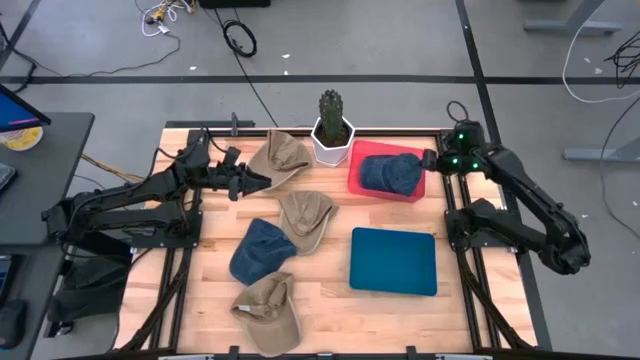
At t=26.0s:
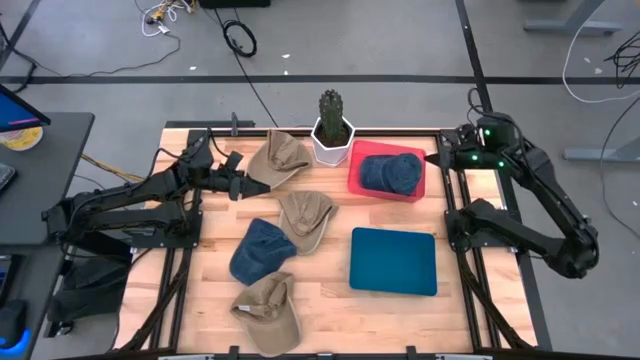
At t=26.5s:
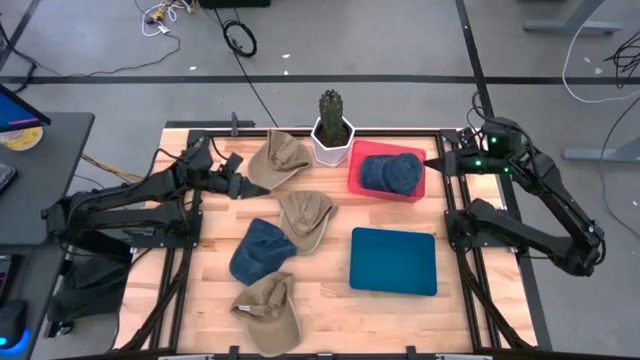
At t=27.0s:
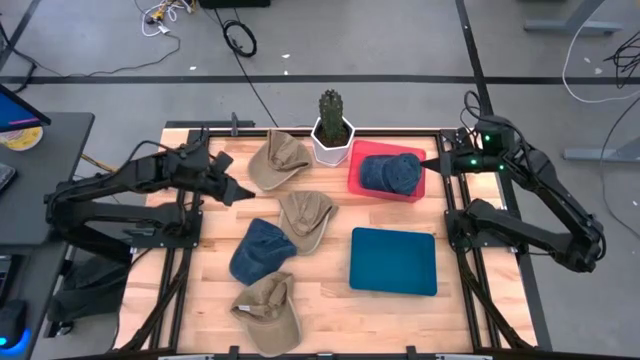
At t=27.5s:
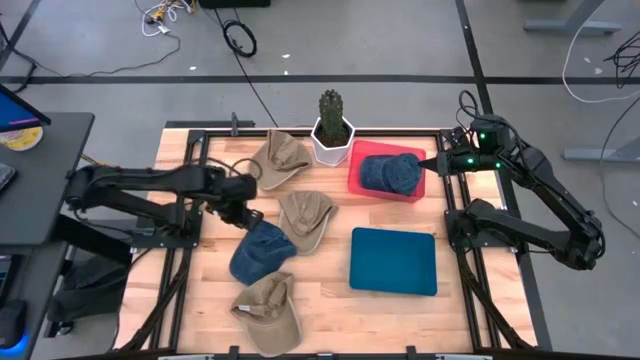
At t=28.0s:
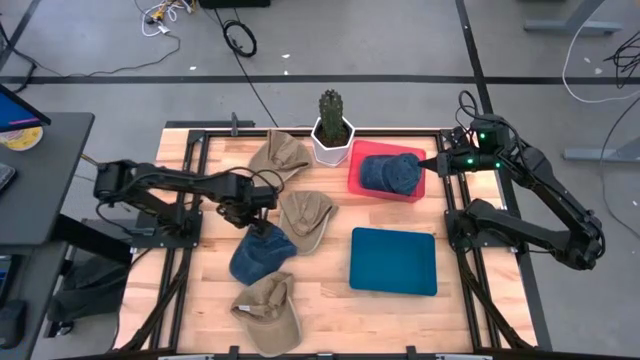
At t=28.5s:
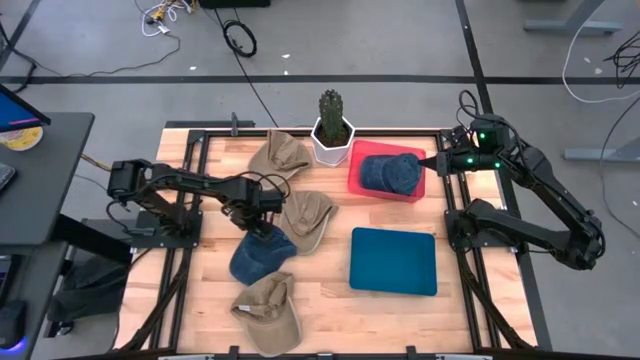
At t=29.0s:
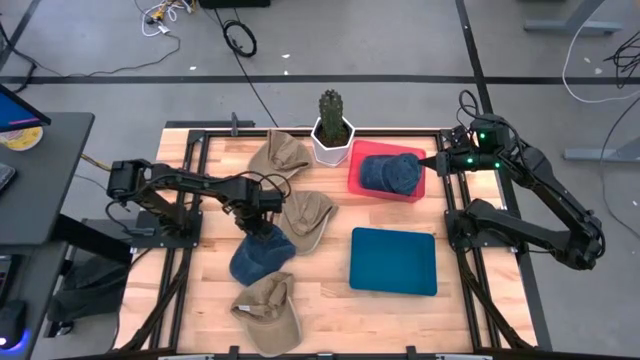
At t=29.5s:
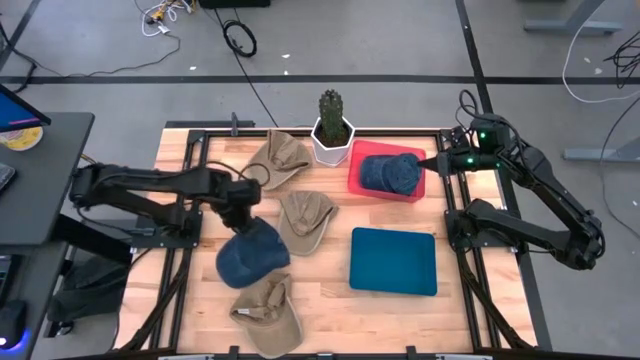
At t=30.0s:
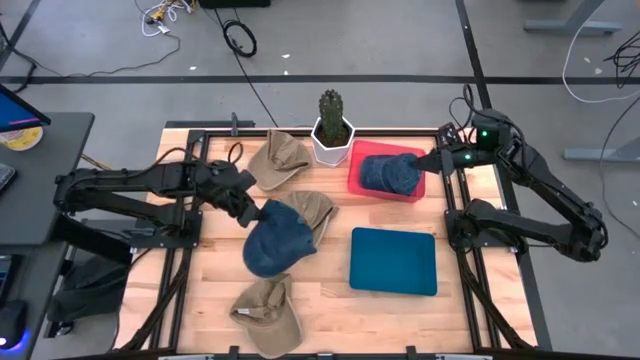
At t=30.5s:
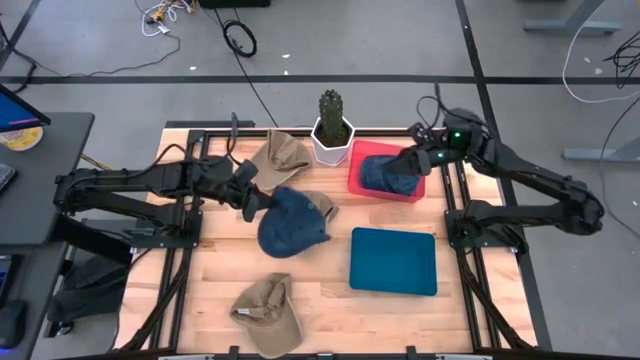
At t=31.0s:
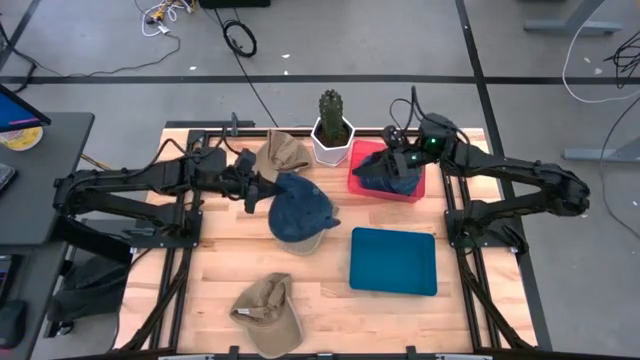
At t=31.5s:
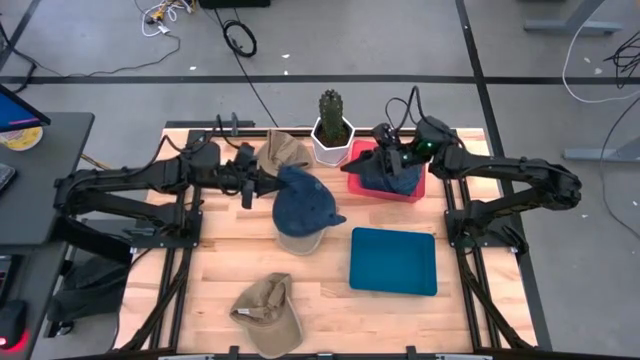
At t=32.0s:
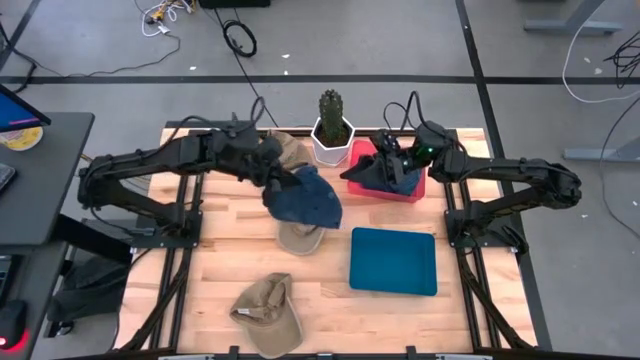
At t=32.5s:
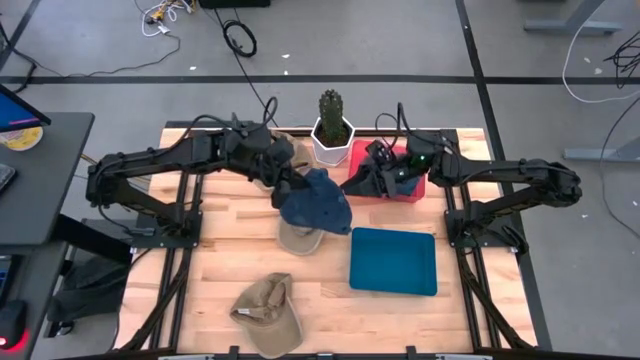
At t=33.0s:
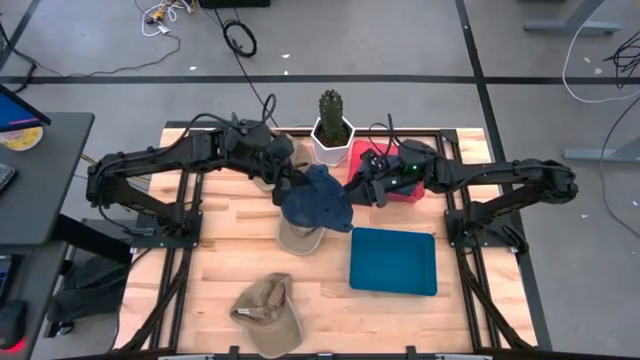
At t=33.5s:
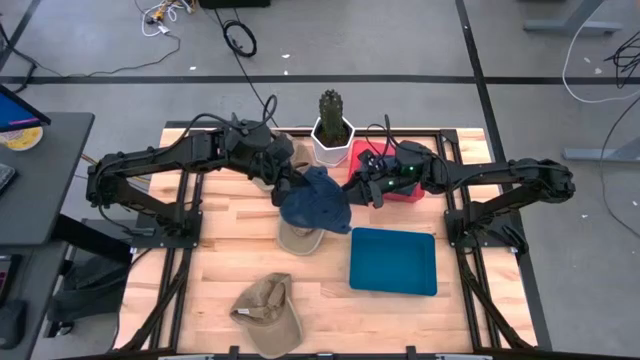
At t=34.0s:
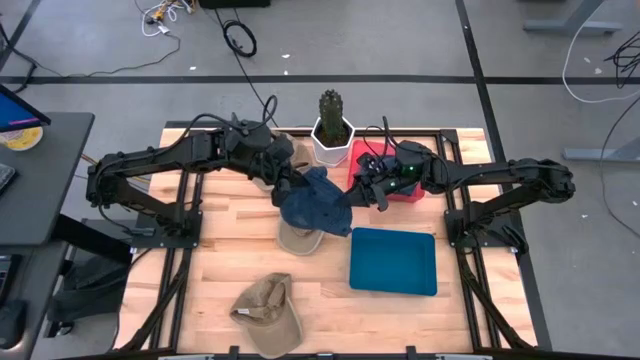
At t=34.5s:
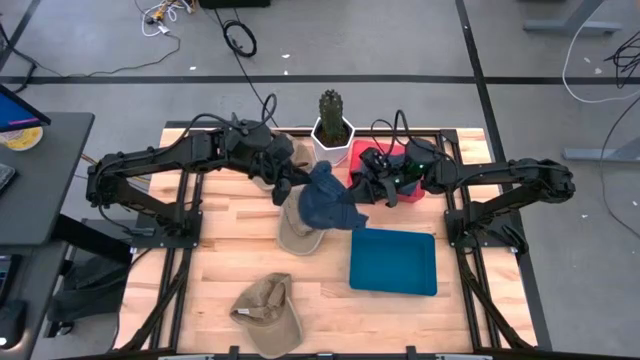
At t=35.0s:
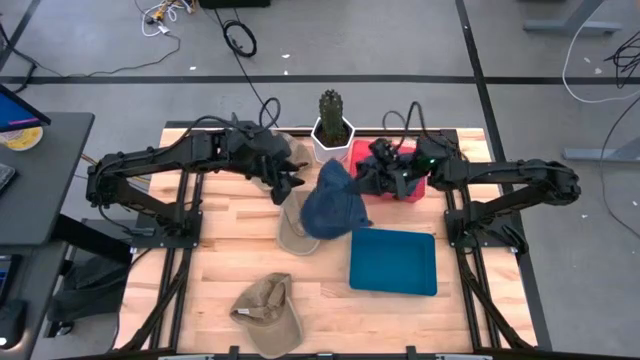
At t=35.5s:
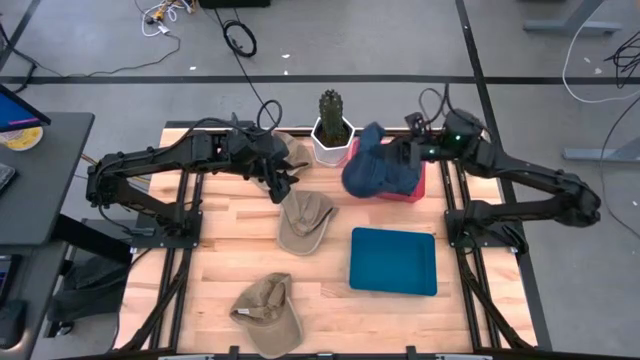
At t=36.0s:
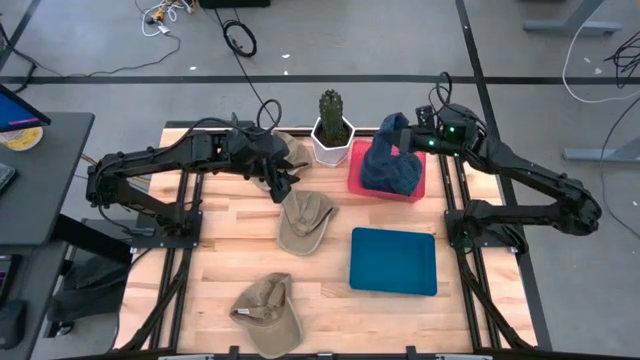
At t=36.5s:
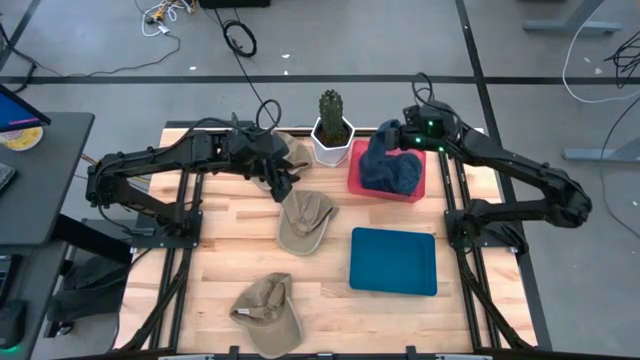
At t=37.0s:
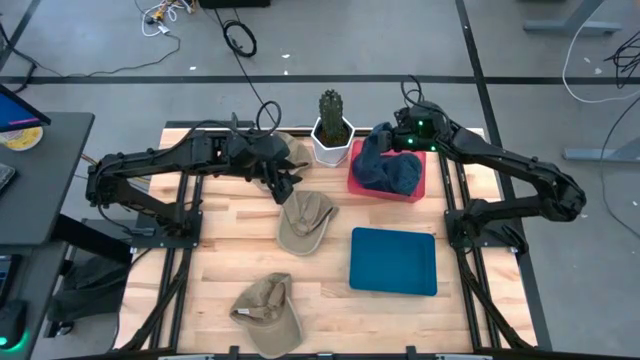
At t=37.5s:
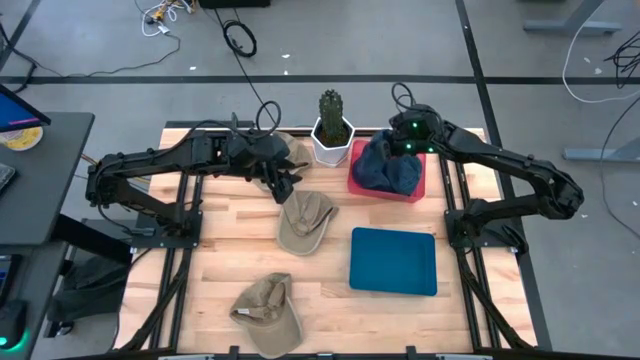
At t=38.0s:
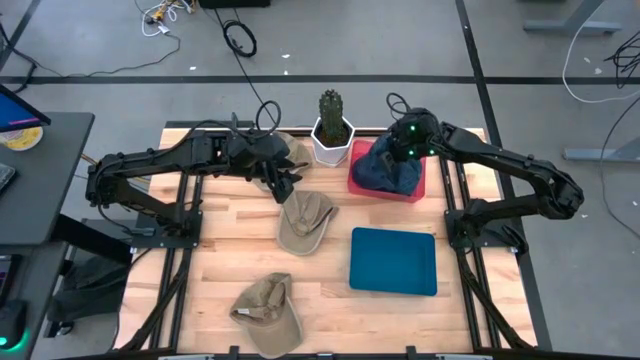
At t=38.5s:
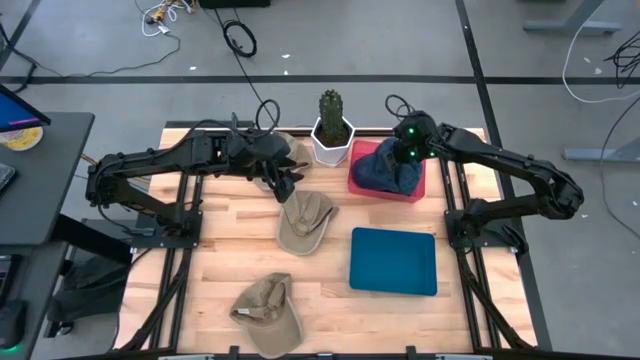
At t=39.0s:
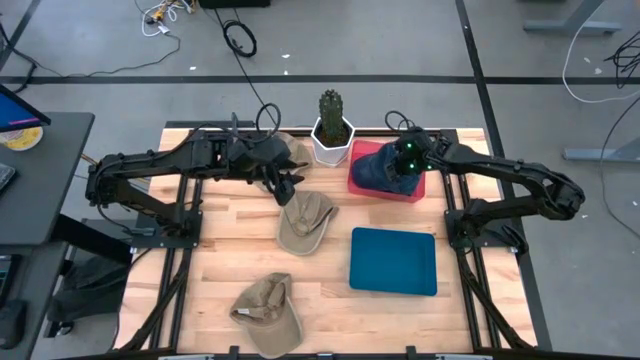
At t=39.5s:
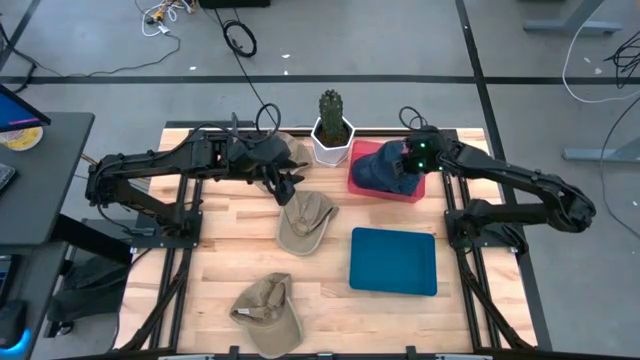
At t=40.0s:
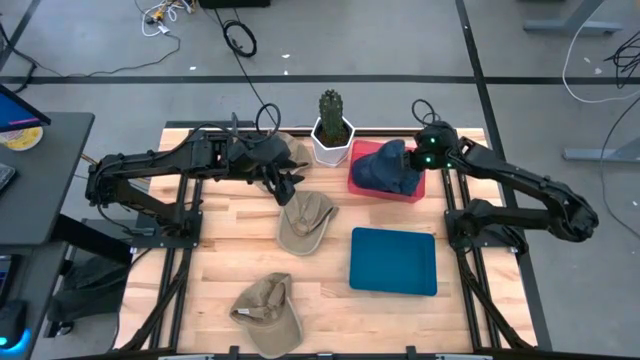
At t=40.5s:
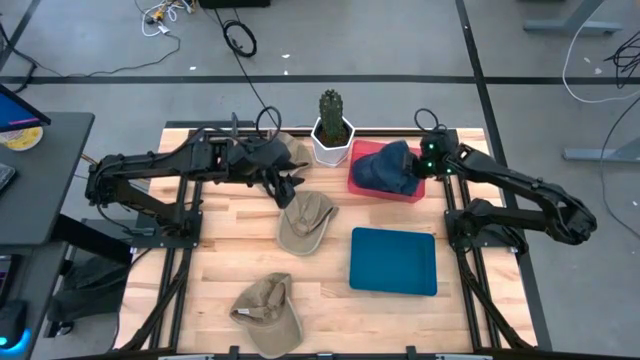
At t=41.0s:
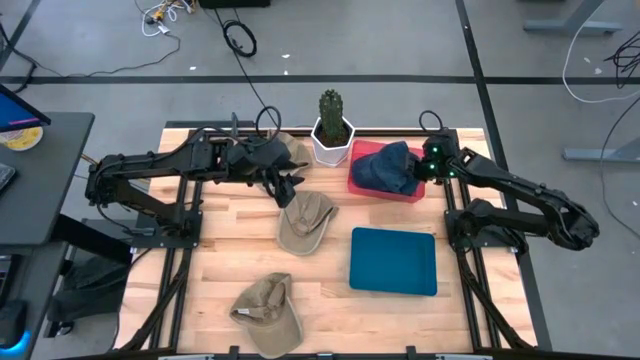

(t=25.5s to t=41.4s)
Task: Pick & Place hat
Put the blue cap into the red bin

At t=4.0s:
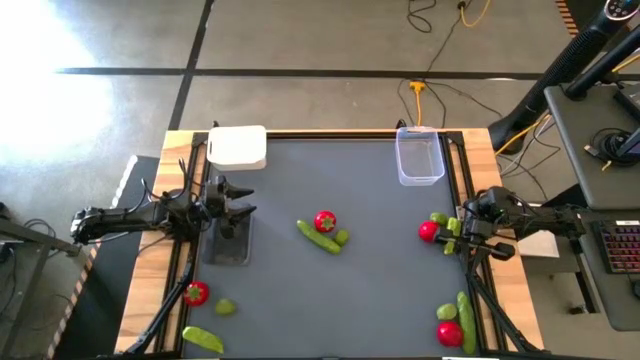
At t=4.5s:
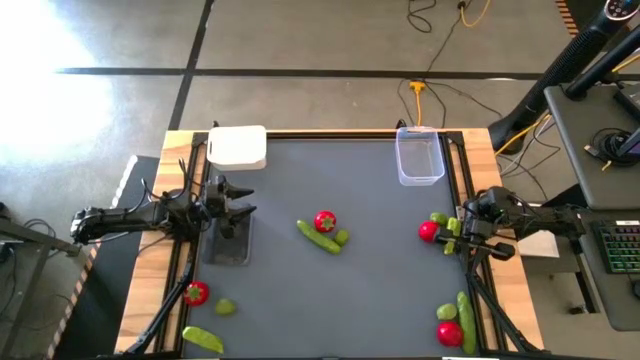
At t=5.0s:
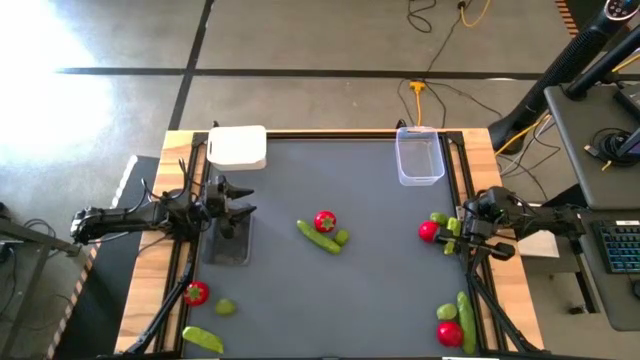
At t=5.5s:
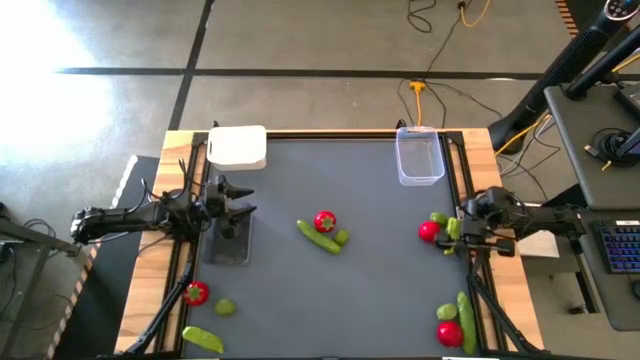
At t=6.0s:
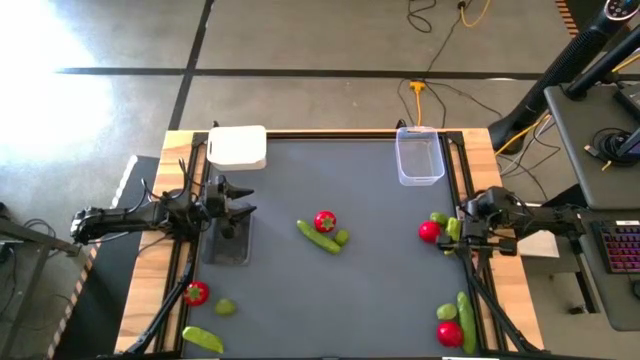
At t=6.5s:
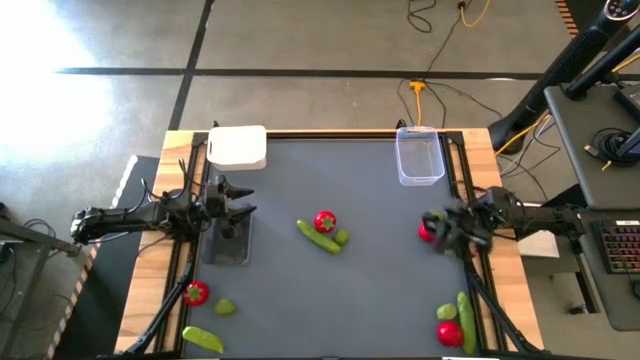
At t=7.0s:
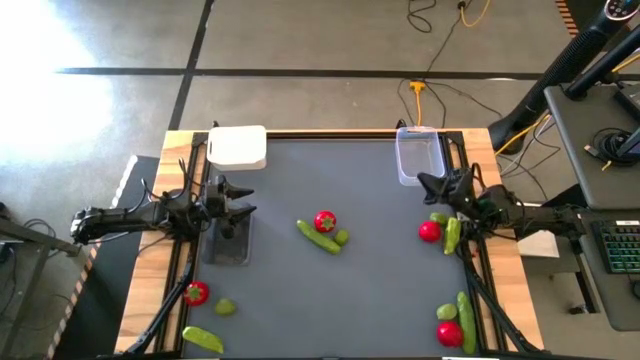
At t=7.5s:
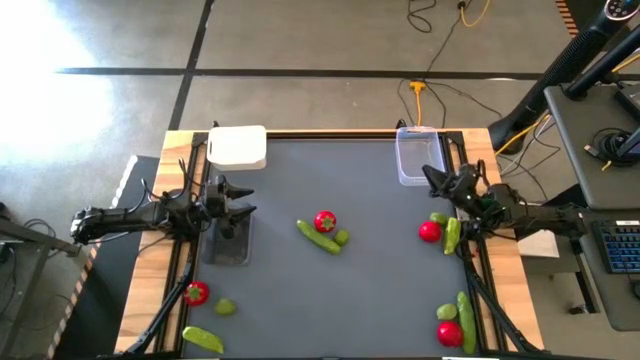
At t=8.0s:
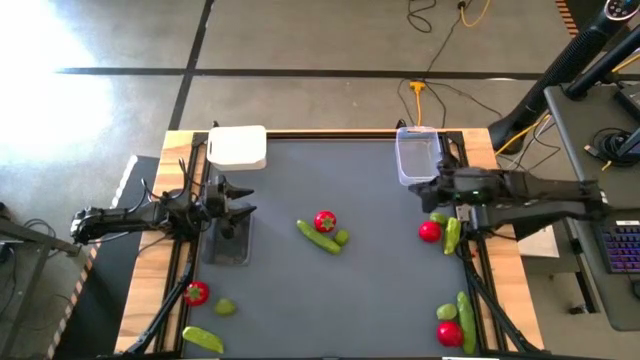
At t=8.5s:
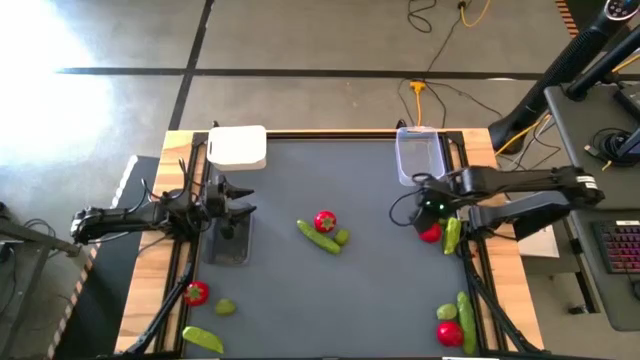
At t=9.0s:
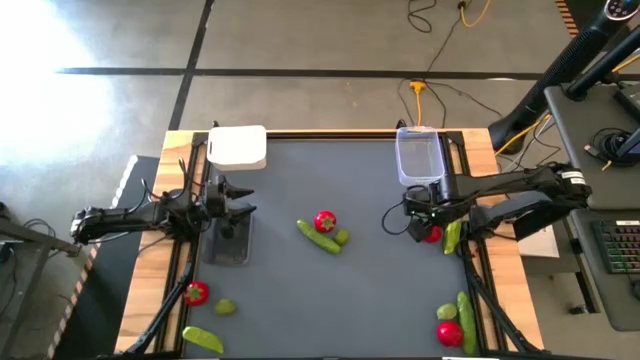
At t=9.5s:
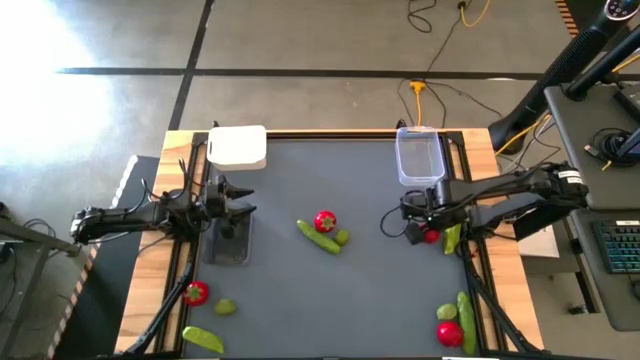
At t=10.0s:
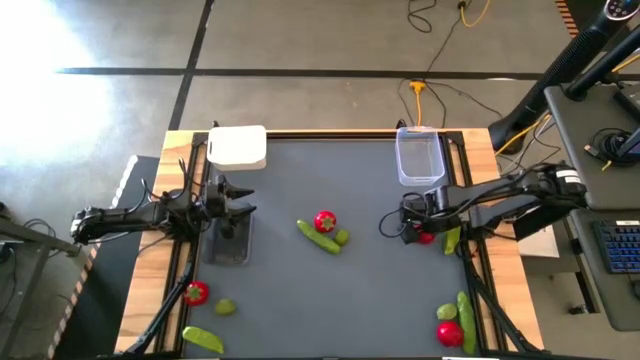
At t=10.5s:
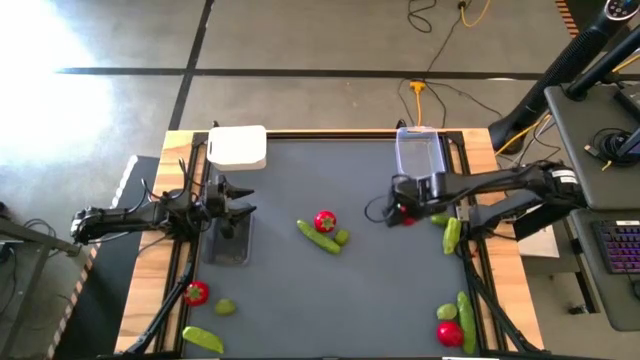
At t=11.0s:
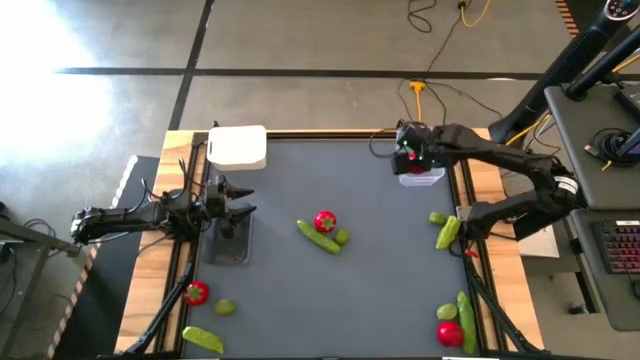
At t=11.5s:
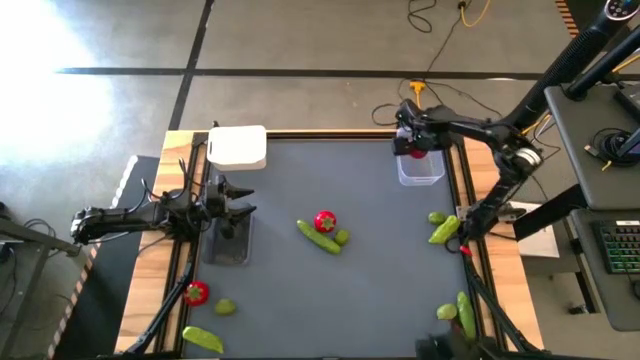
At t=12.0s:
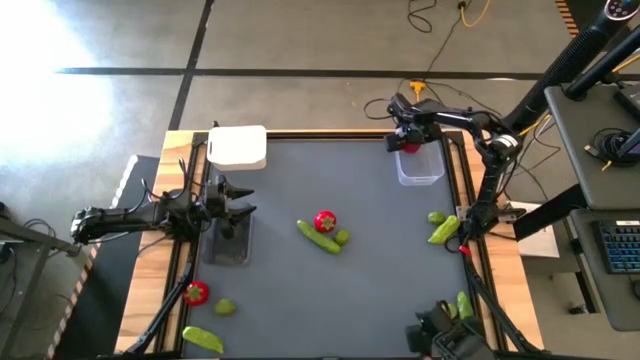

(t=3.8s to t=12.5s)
Task: Sort produce into baskets
Put the red tomato into the transparent bin
